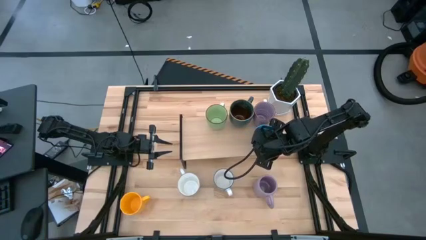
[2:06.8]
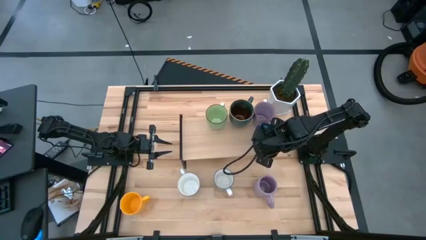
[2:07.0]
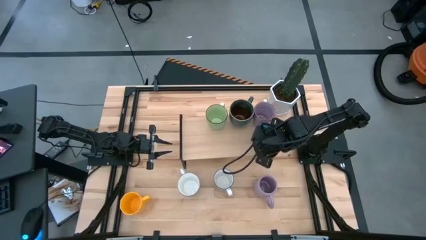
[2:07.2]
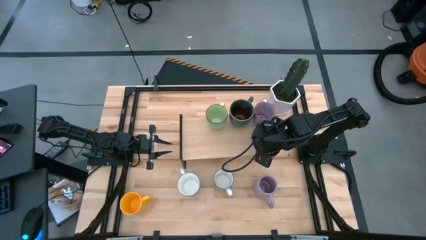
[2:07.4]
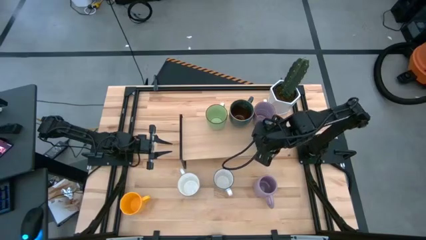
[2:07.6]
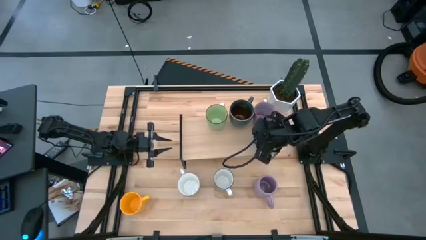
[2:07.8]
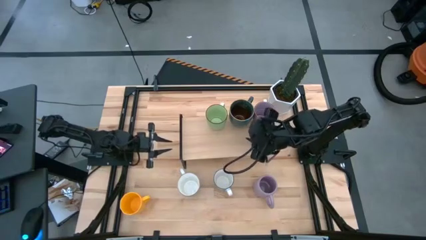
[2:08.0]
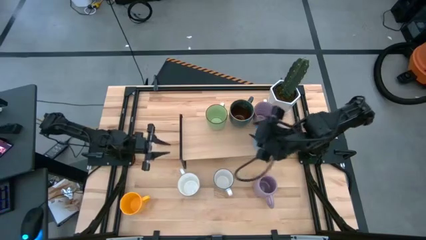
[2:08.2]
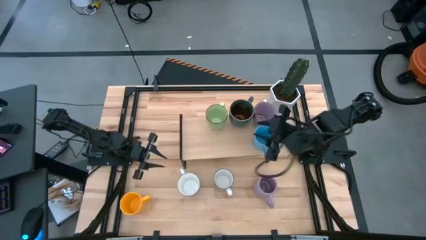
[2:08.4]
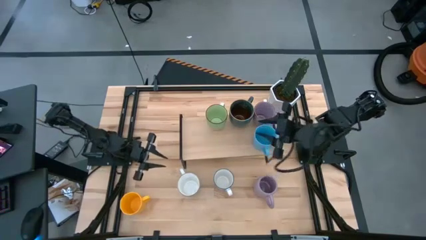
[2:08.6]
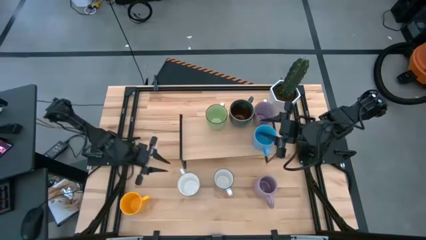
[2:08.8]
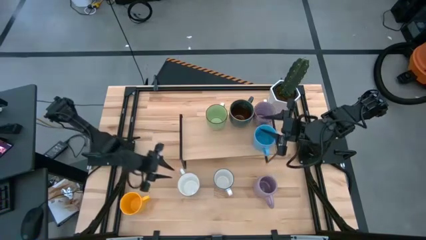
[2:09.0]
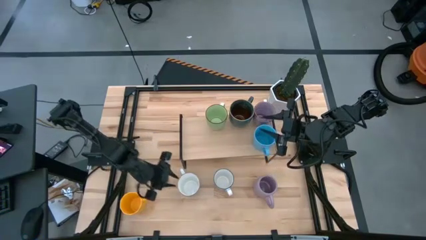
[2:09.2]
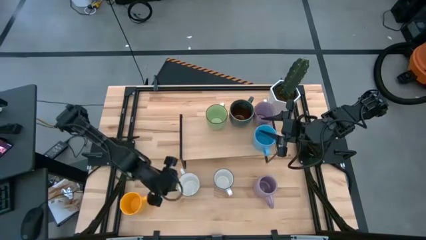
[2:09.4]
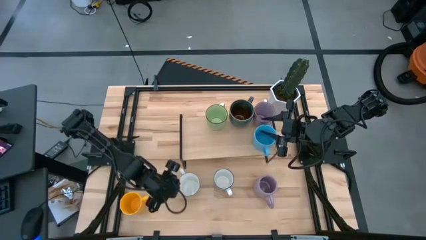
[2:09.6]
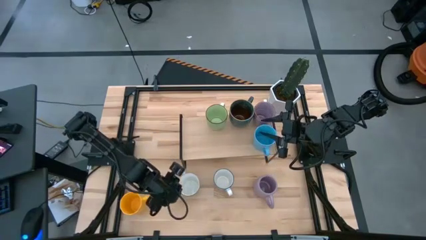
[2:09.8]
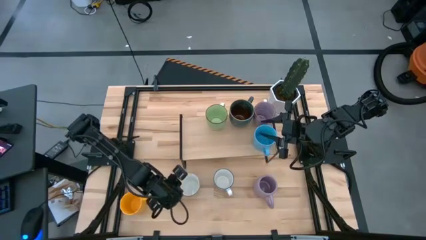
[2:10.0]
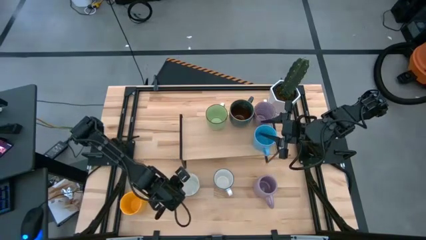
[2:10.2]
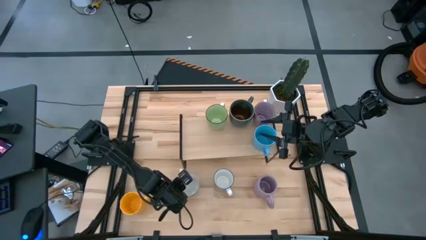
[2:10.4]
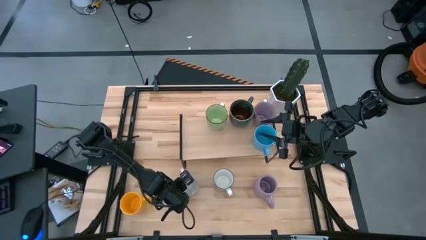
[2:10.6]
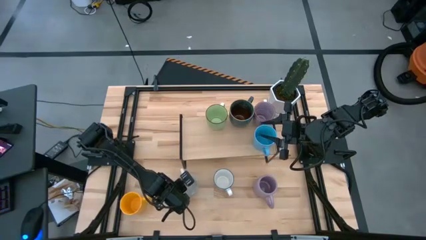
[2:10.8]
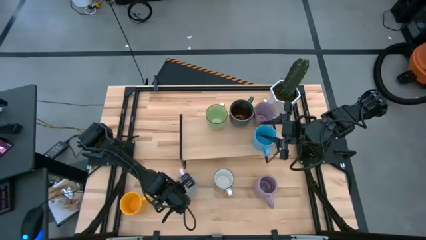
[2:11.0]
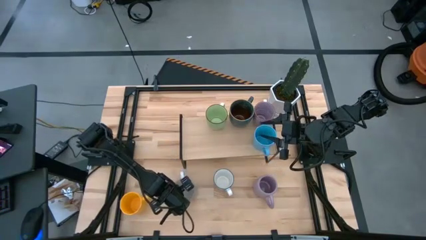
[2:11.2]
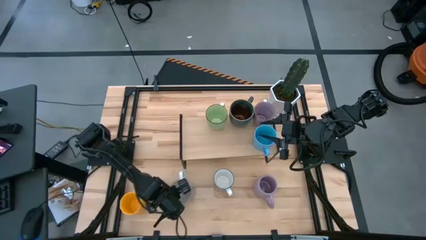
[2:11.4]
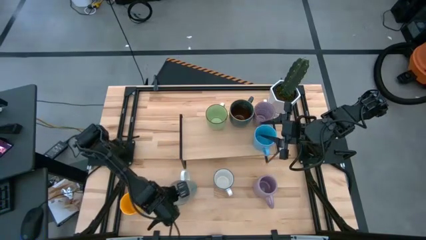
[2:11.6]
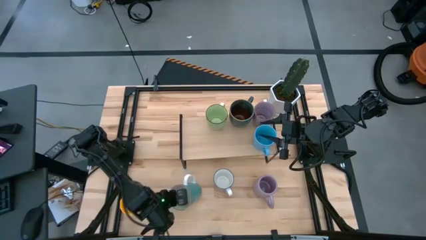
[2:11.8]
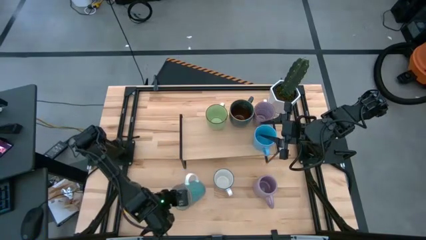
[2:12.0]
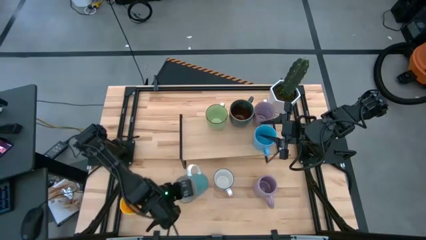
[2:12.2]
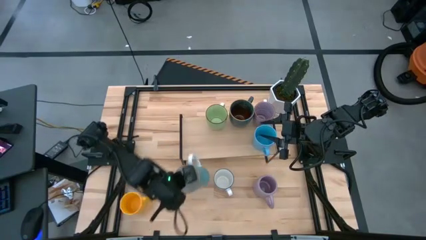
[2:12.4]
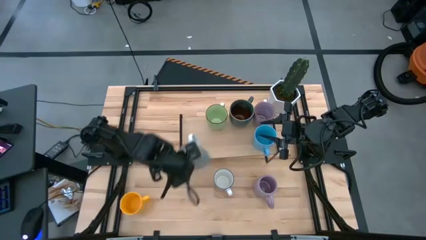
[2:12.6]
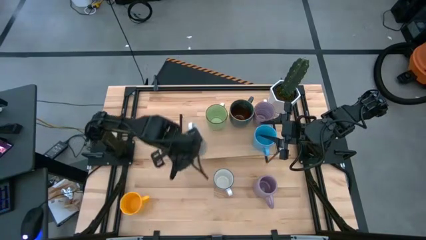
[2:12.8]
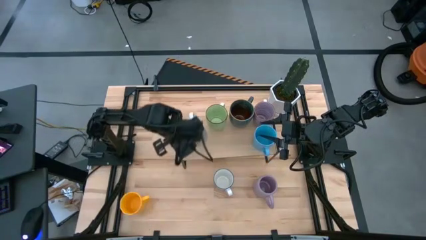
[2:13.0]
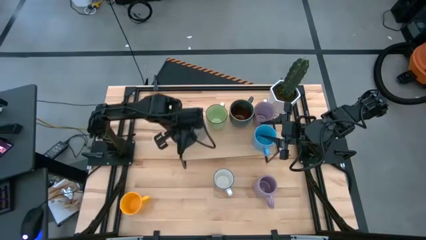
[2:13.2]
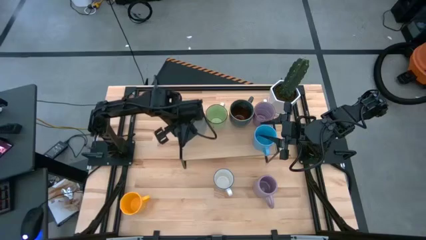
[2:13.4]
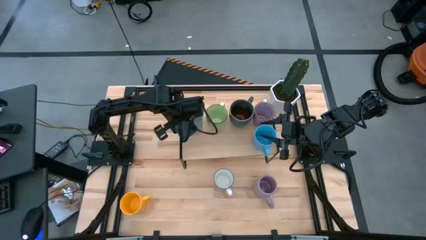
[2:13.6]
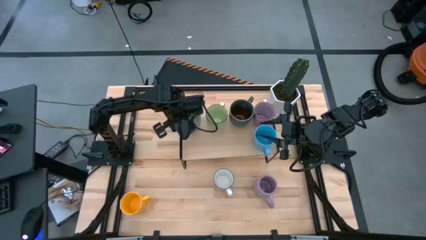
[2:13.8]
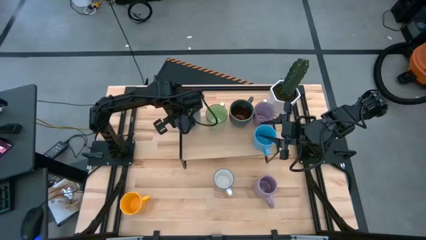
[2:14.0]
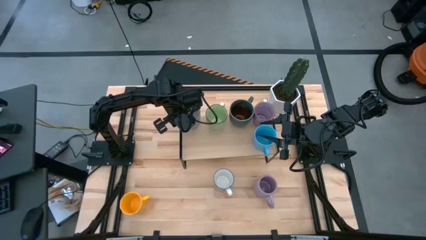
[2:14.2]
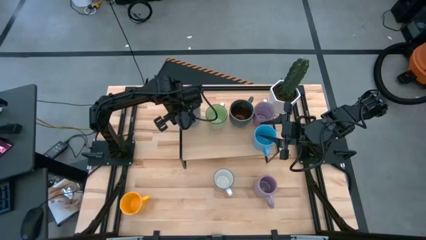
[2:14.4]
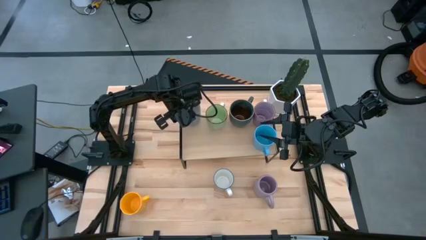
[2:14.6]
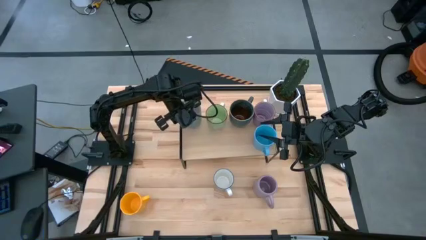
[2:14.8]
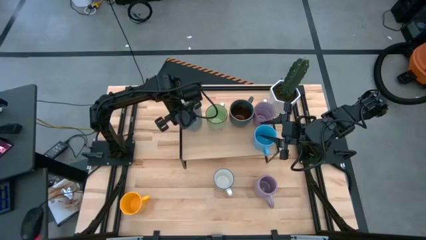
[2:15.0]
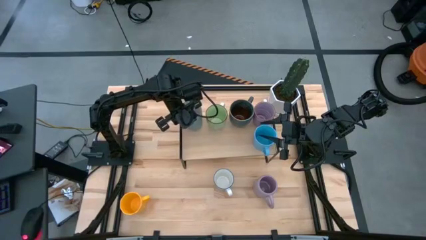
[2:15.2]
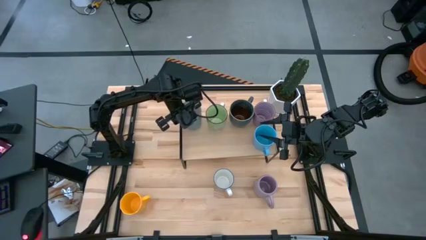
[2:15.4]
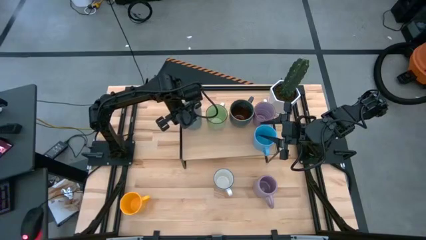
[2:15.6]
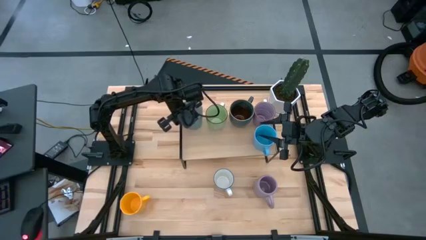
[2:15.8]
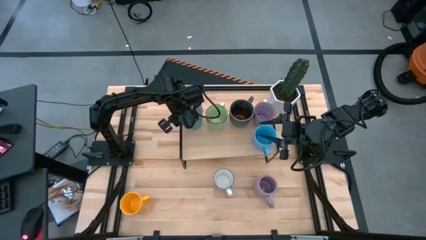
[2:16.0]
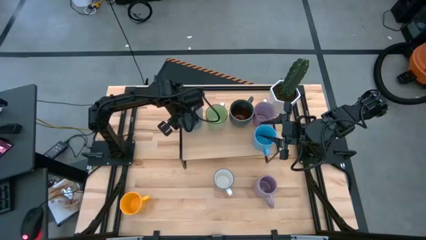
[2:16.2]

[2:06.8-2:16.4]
Task: Place coffee mugs
Put the light blue mug on the shelf

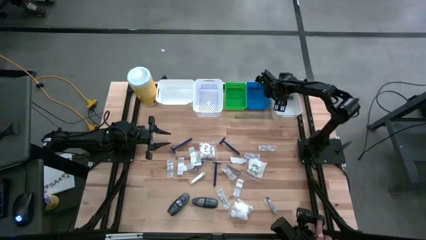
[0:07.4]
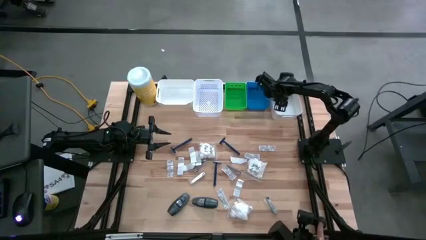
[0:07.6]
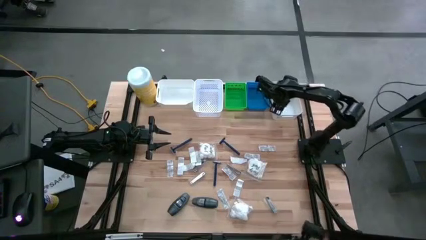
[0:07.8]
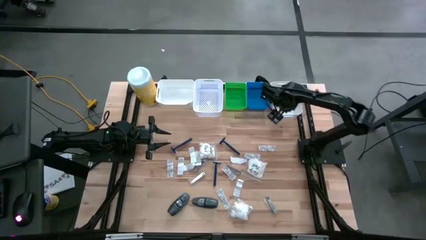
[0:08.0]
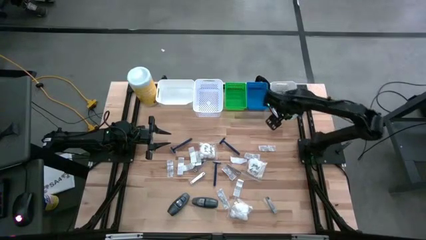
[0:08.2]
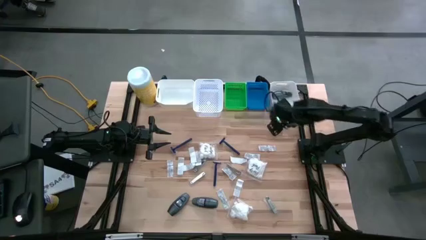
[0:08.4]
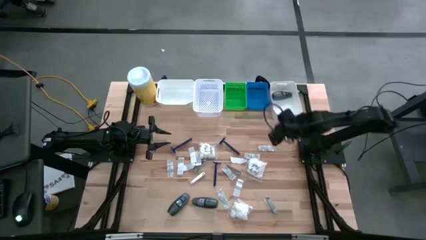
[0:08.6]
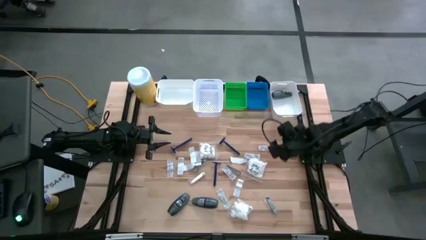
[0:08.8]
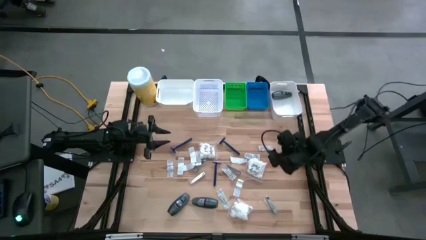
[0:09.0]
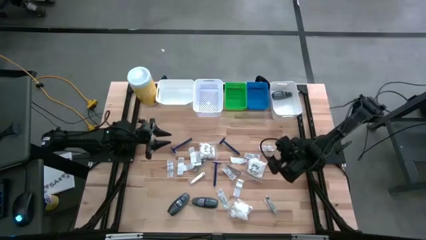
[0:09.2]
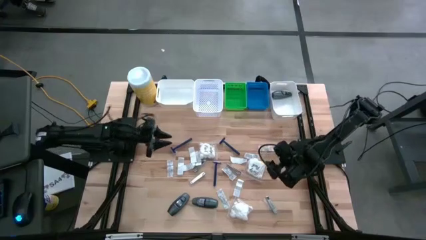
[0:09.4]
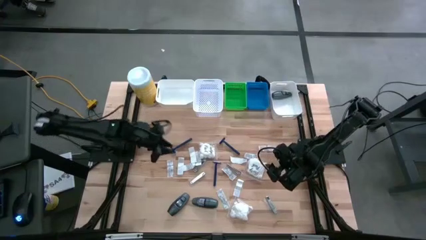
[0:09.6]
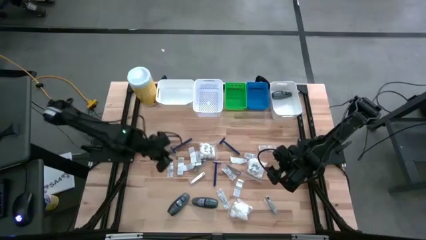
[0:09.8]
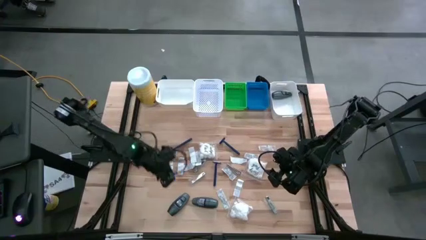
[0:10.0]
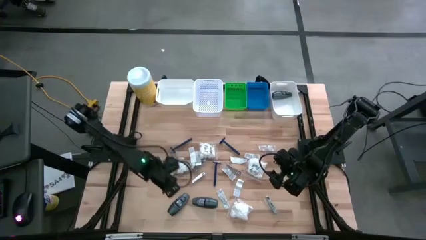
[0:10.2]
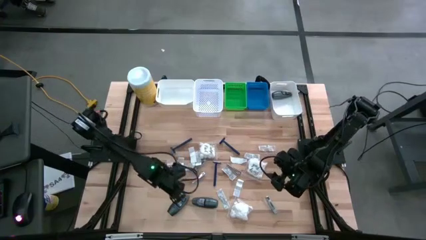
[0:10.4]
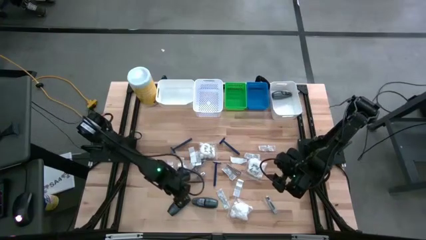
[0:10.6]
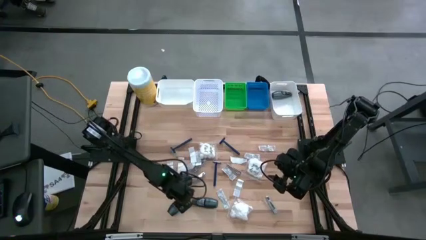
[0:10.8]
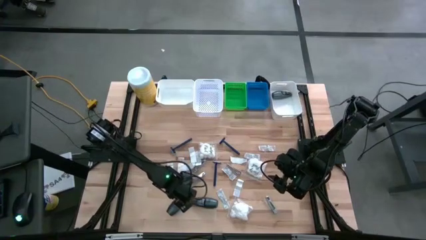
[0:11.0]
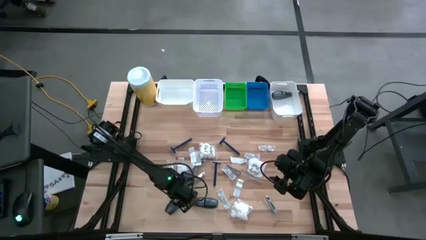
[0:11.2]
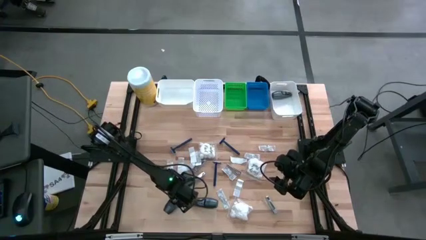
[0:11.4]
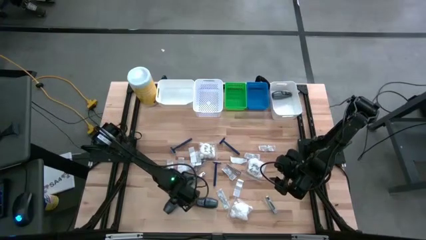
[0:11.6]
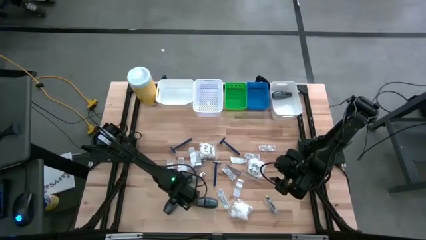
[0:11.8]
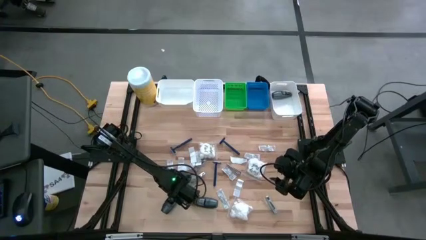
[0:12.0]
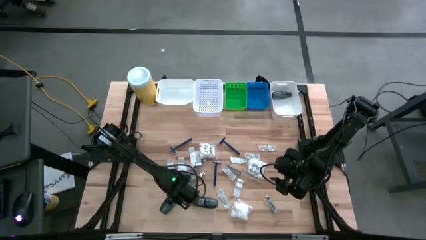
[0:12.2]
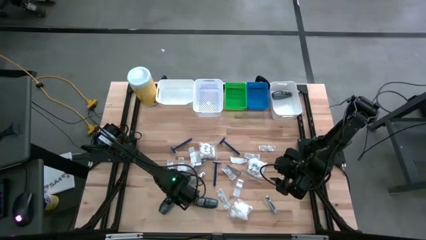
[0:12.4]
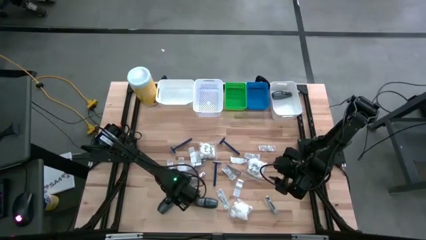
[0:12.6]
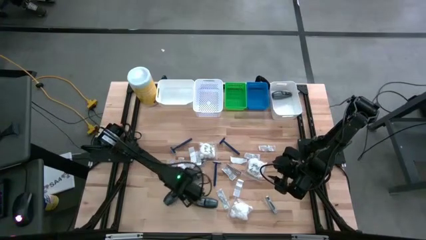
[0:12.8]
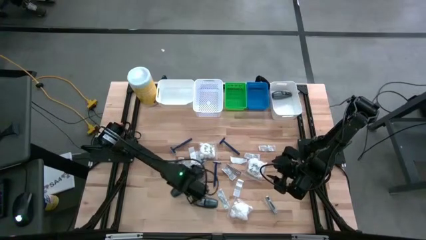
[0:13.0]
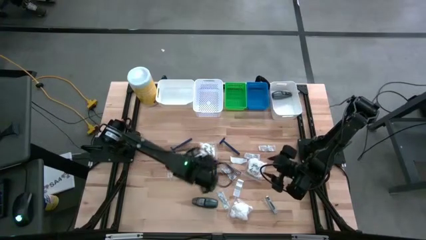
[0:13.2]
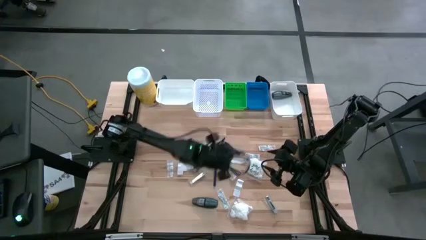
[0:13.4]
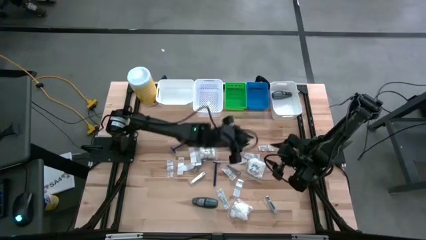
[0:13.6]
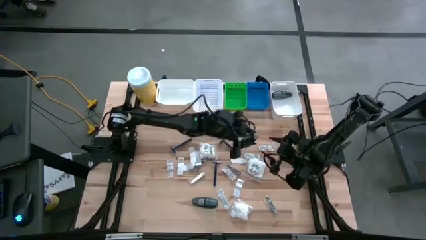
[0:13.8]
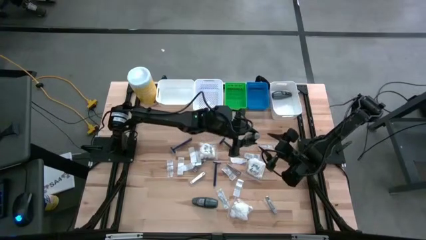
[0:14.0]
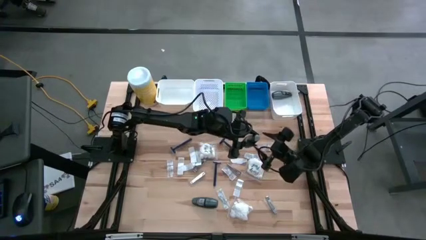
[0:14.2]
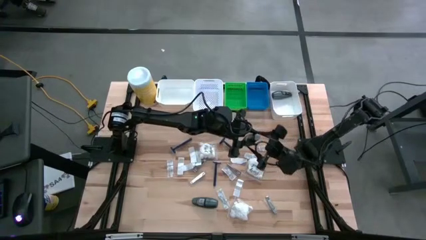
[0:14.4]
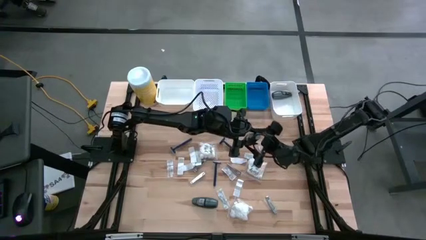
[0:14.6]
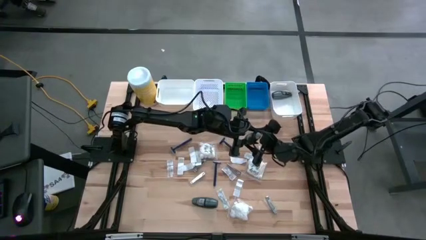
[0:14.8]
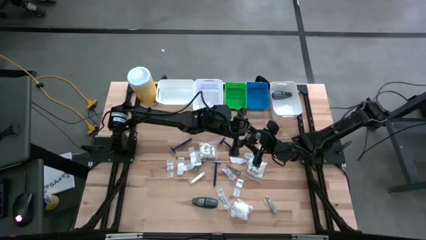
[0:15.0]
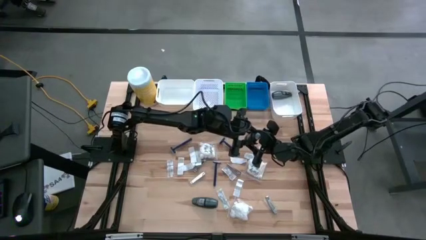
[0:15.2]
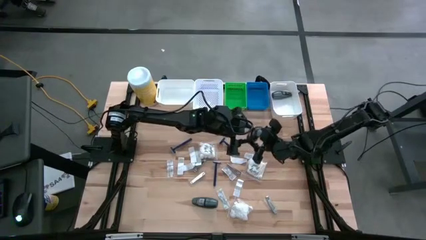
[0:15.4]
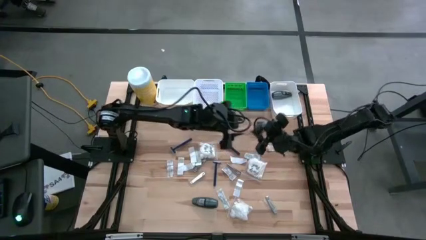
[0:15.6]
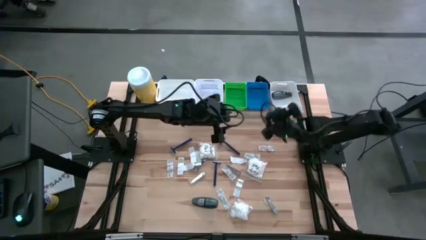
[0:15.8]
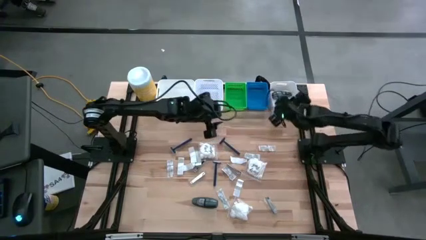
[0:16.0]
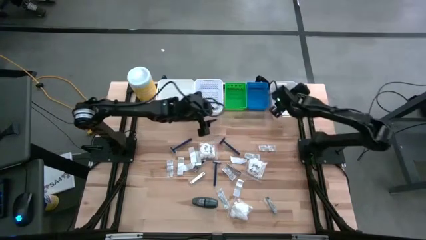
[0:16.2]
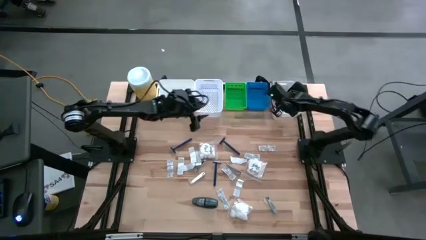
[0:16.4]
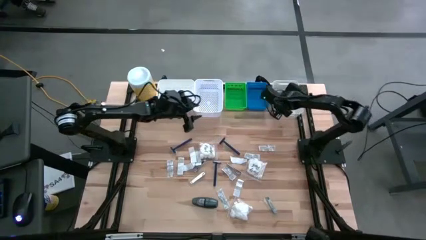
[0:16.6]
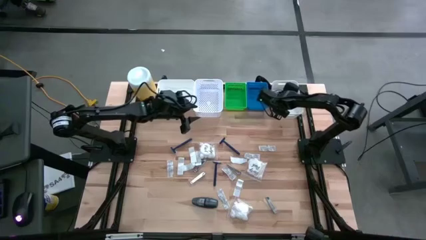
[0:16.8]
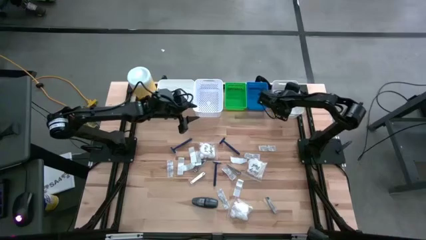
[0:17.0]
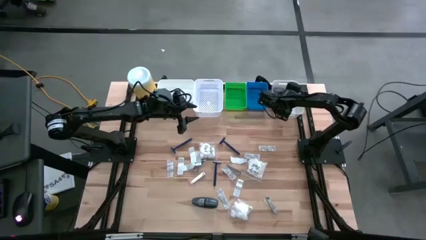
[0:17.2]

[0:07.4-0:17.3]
Task: Pick & Place Travel size toiletries
Put the black deodorant into the right white bin
